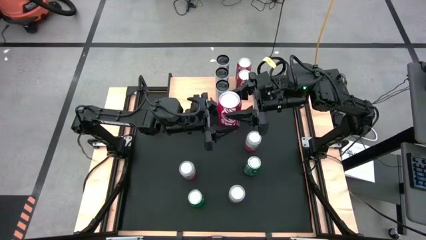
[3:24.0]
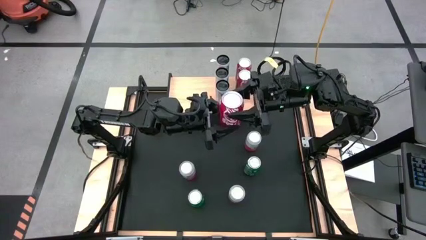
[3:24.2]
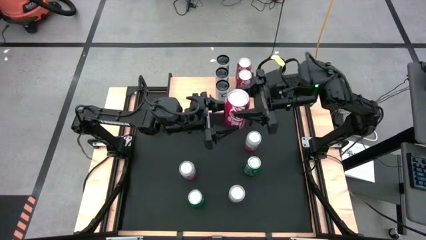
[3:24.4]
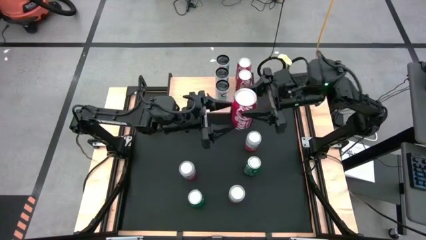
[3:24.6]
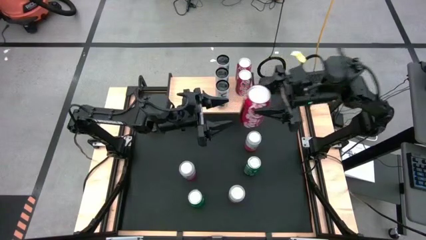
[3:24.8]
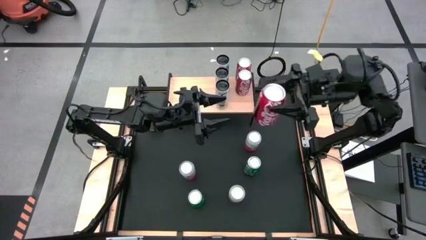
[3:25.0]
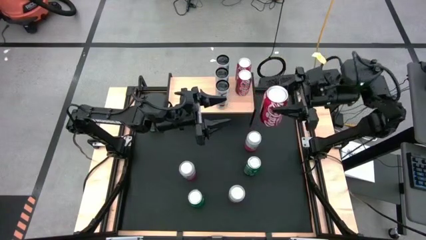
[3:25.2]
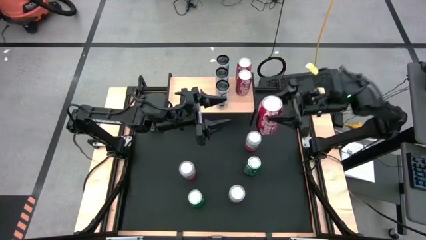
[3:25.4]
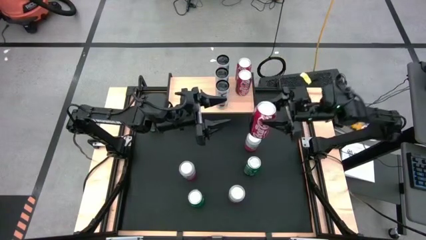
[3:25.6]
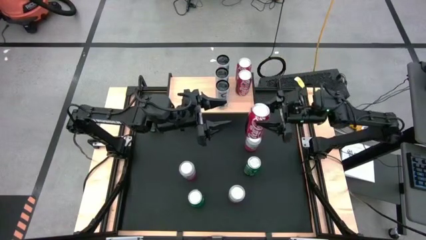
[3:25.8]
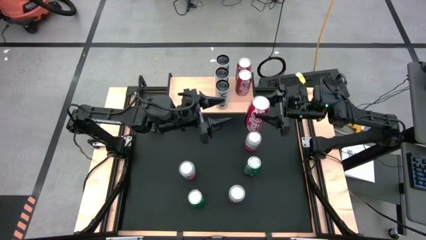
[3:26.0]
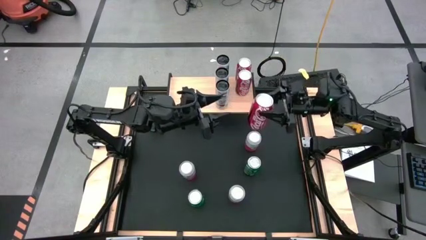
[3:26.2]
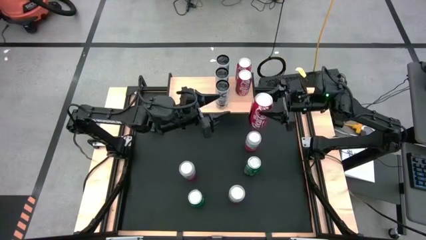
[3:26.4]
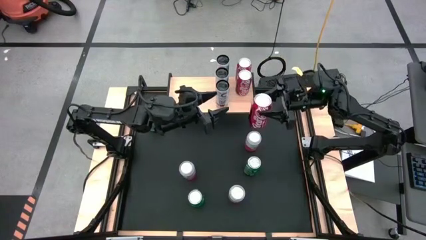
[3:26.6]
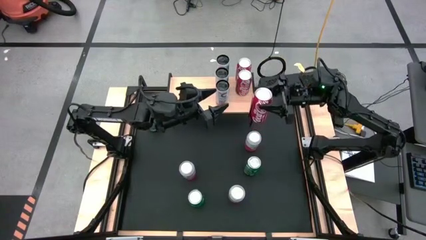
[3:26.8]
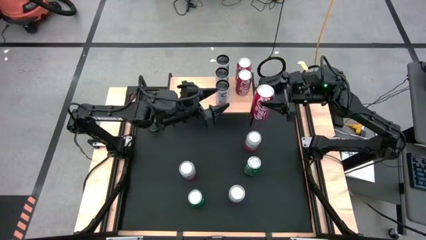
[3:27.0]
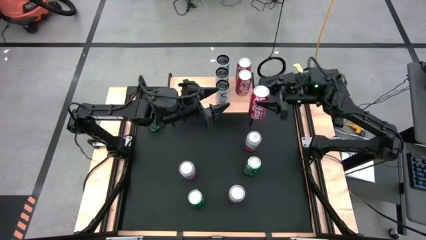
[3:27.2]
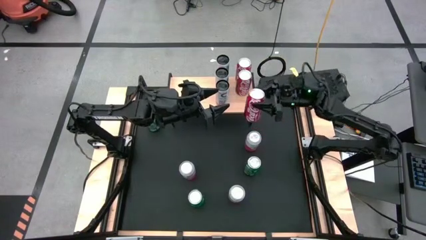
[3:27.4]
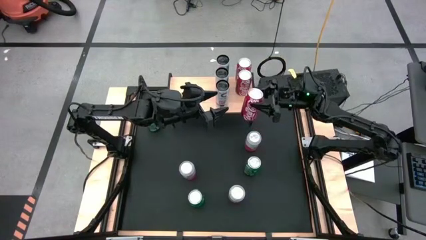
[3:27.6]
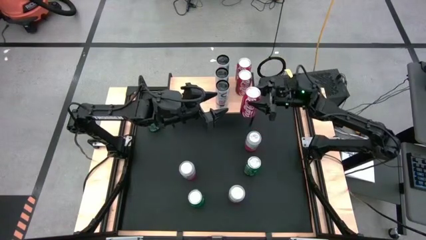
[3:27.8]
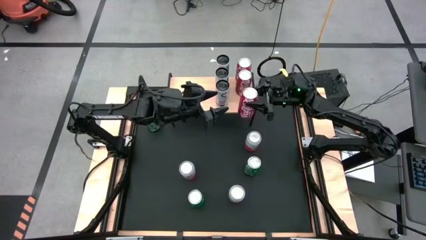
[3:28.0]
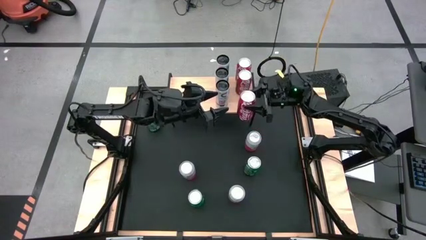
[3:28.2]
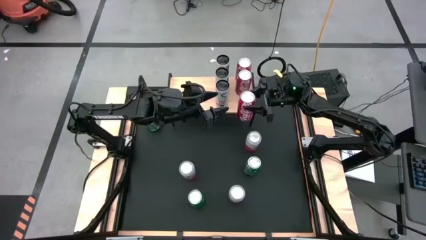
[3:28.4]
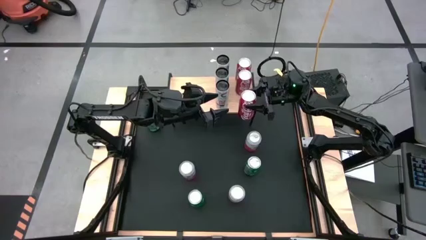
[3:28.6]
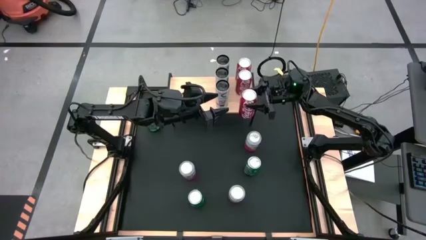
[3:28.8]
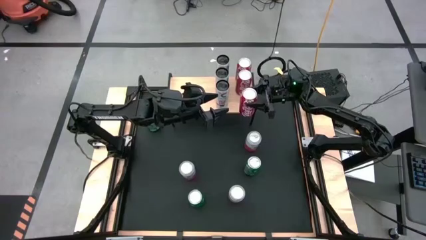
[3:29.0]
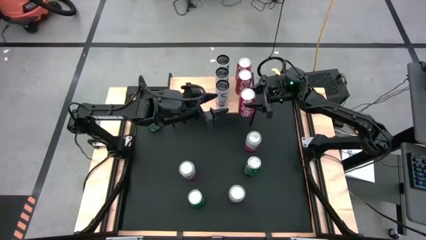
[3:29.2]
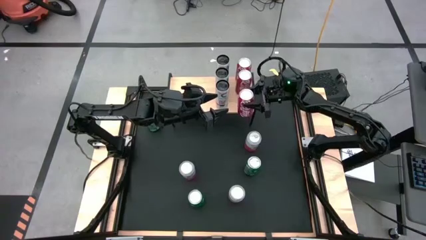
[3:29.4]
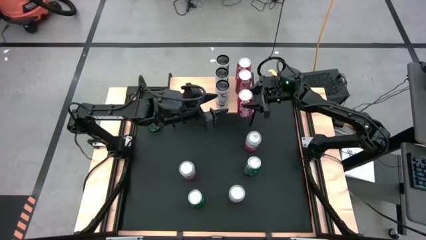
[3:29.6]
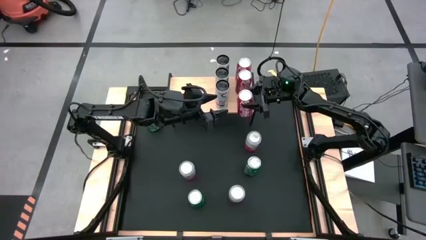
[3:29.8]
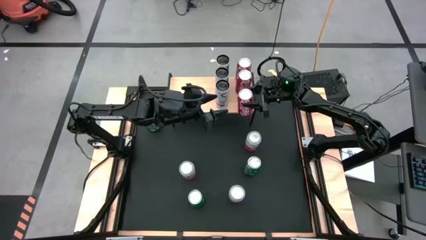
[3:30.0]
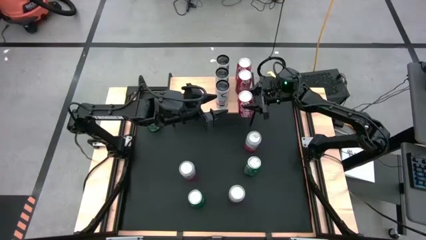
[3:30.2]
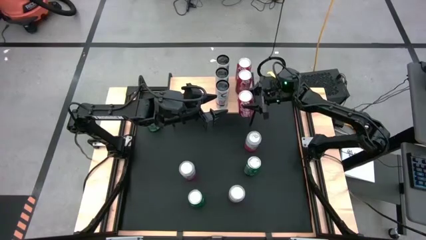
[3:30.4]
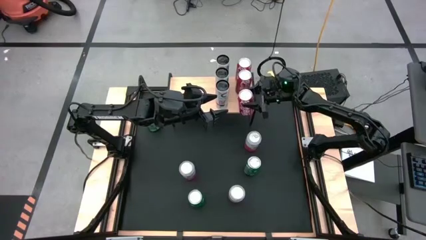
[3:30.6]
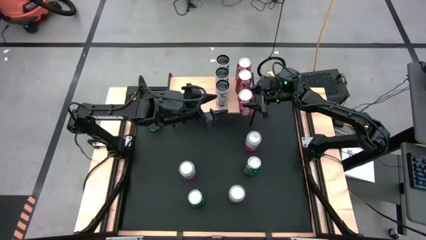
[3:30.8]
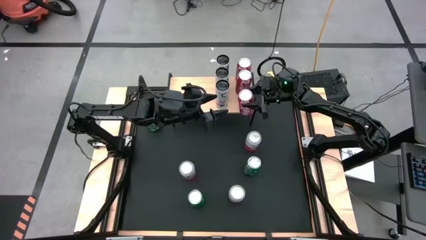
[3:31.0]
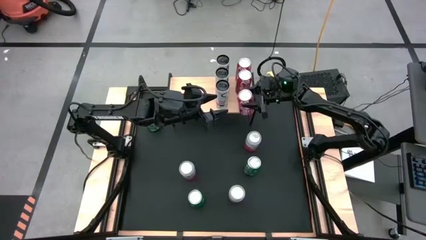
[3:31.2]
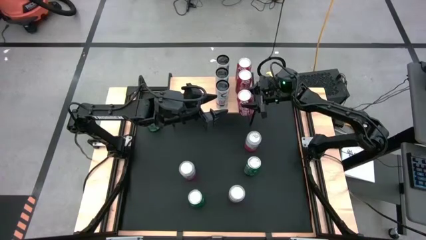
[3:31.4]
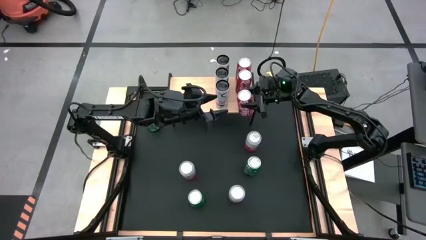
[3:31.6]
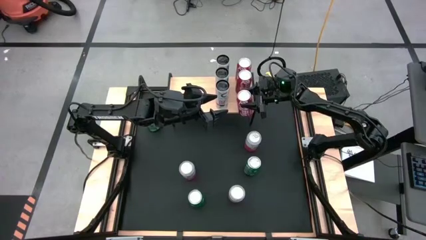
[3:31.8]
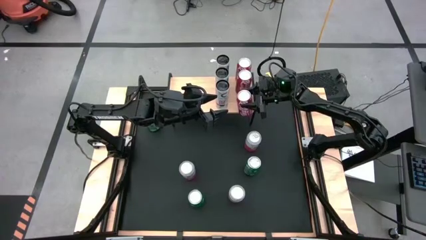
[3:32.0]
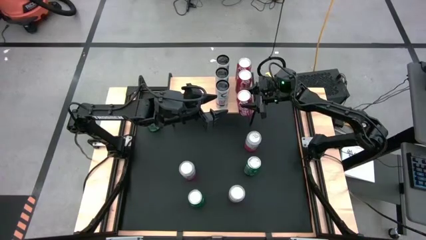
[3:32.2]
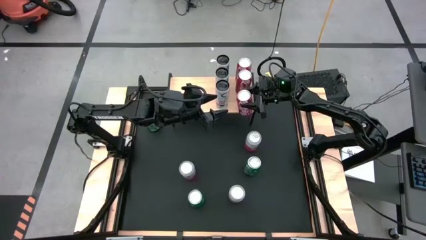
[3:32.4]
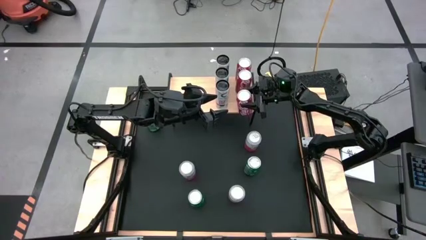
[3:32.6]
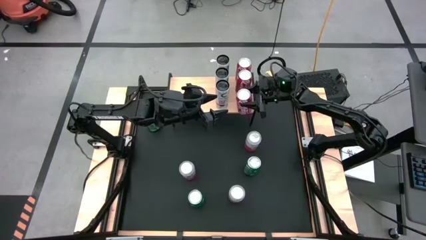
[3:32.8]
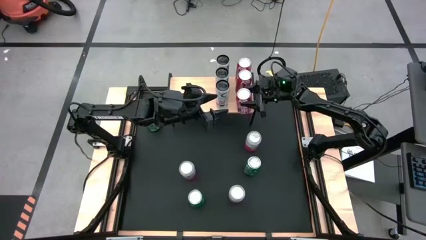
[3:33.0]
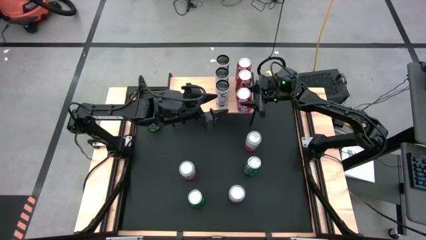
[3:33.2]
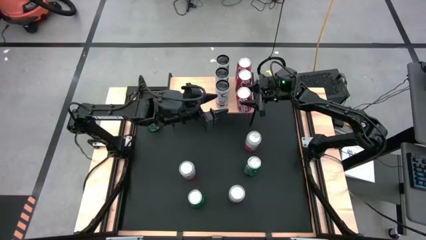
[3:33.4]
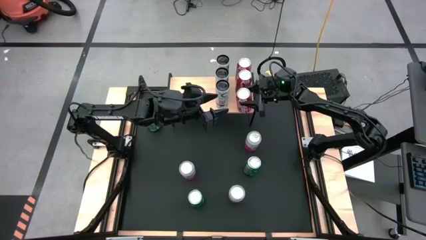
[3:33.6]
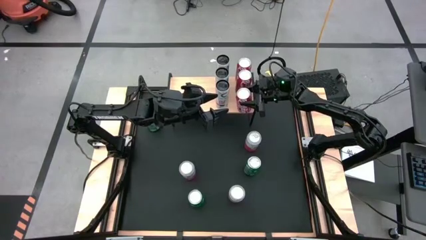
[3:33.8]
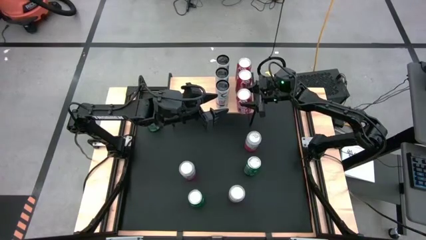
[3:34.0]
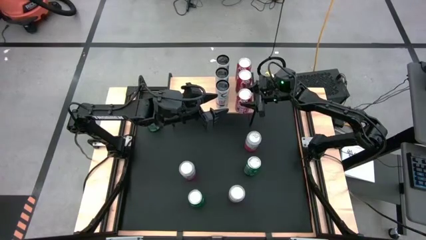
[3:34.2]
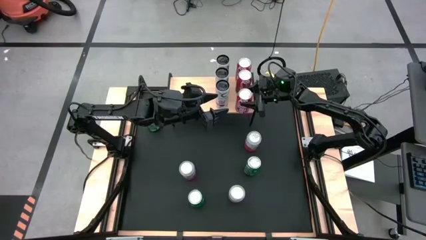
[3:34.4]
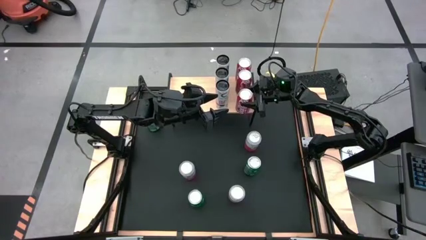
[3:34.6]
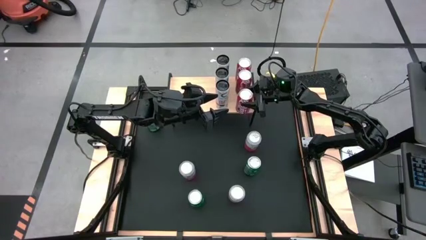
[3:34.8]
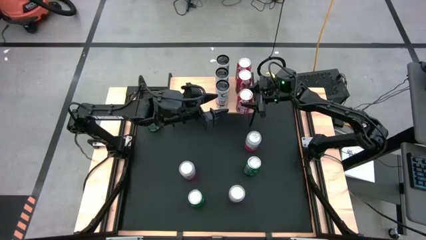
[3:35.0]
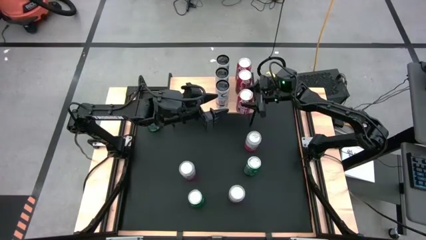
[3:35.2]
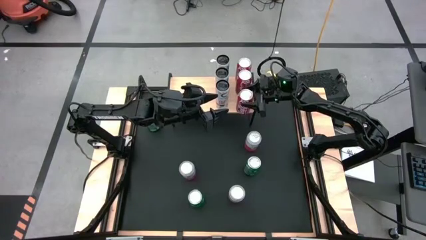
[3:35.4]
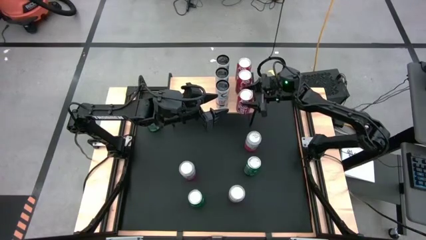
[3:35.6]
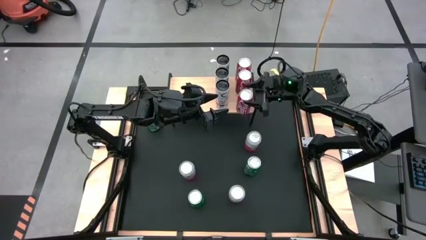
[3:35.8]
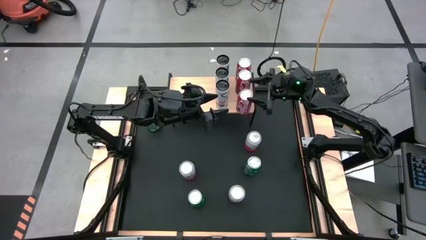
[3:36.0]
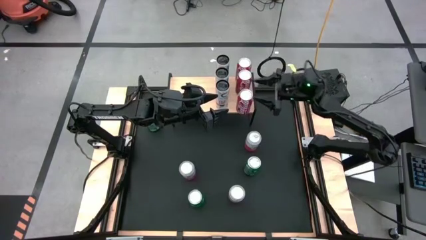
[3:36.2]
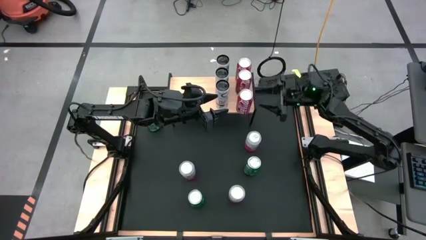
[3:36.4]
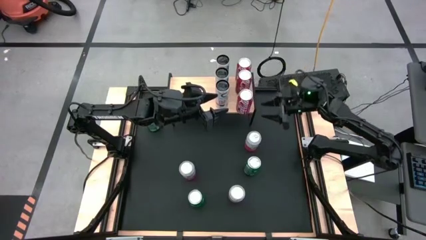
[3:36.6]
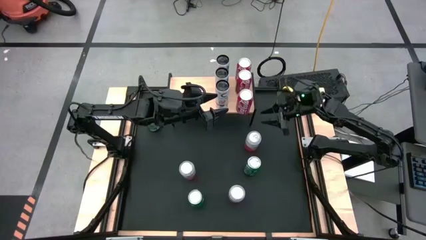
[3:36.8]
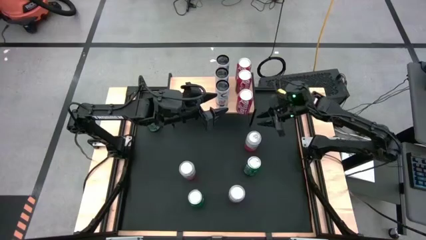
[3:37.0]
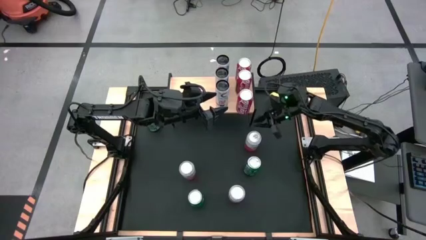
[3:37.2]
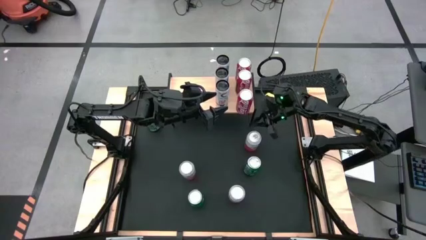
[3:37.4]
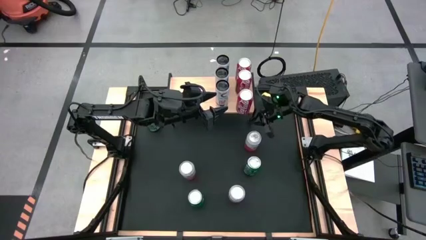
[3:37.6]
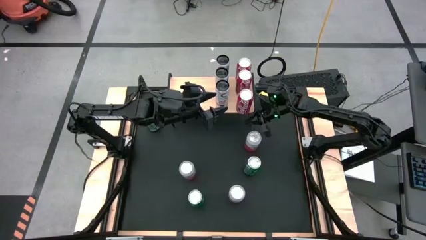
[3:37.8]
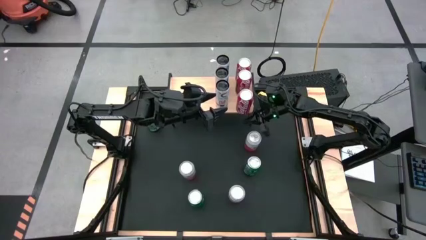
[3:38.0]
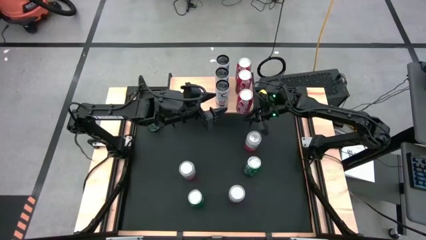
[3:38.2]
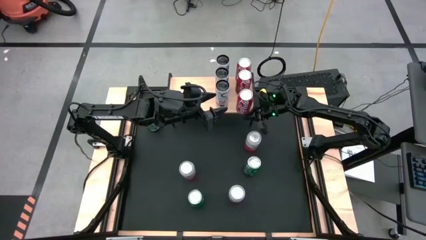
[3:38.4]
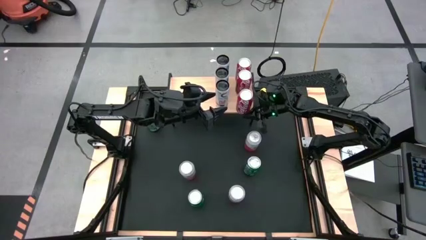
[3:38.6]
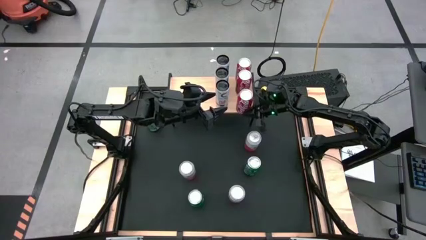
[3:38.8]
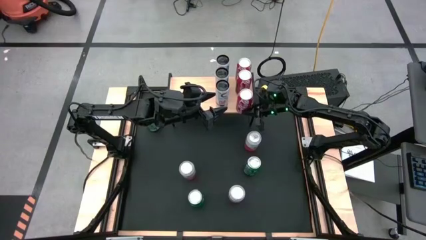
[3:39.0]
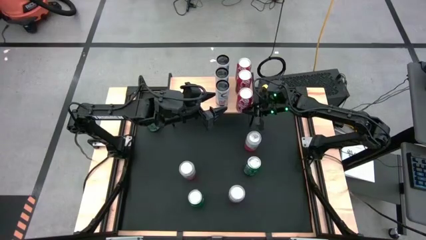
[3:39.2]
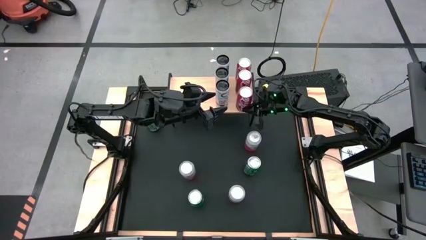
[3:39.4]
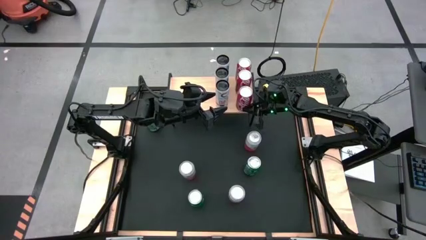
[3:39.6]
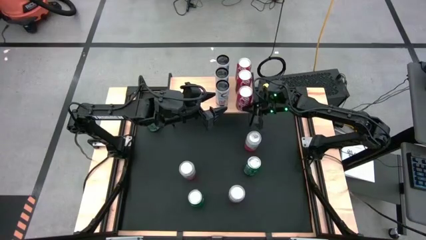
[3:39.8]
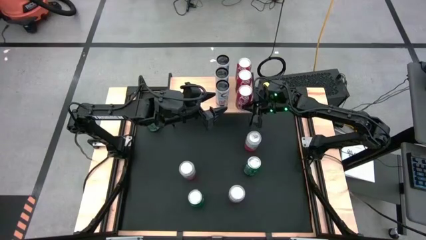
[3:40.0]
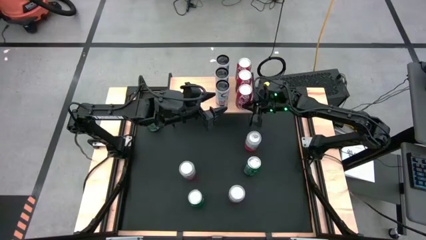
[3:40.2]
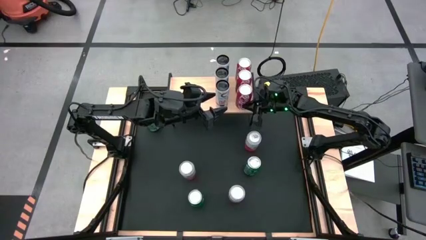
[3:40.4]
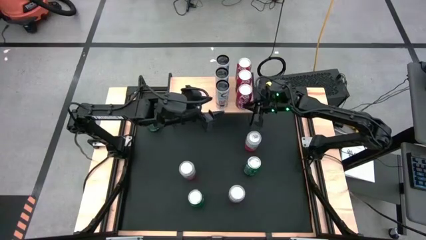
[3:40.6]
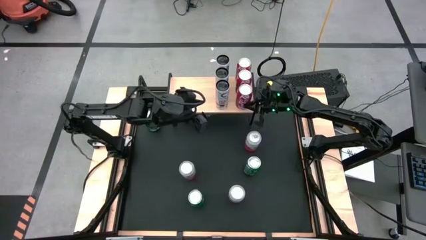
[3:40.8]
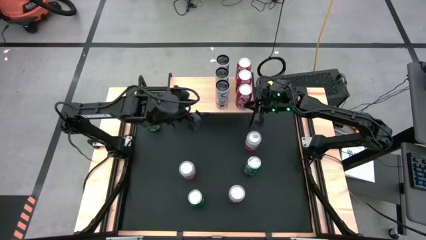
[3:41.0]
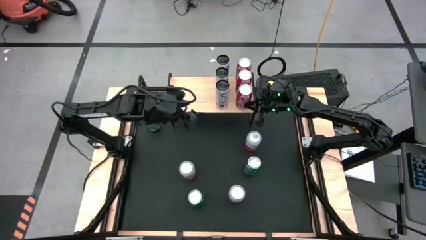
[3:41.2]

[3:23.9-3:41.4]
Task: Place canned beverage on shelf
Put the red soda can aligned with the other red soda cans on the shelf
